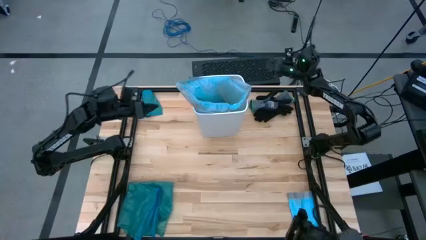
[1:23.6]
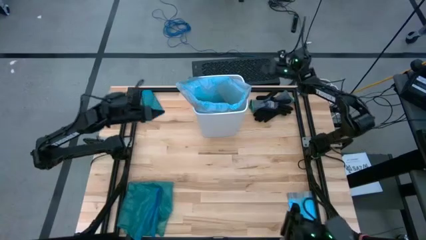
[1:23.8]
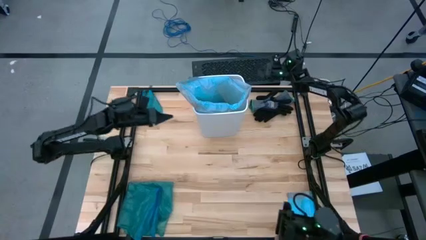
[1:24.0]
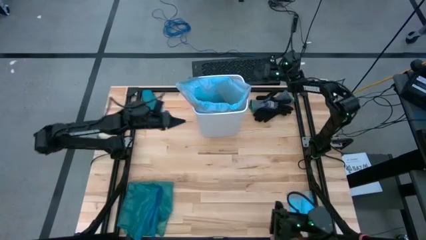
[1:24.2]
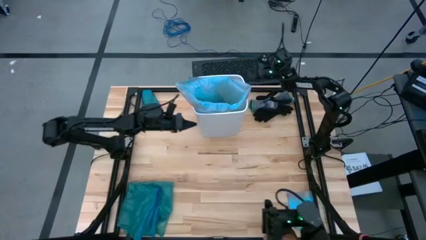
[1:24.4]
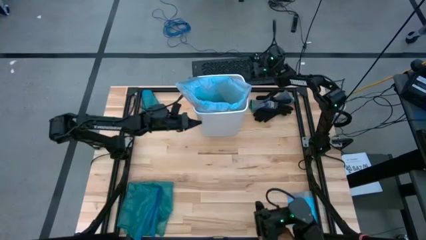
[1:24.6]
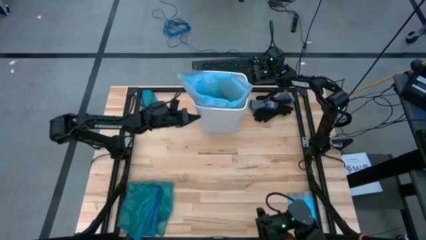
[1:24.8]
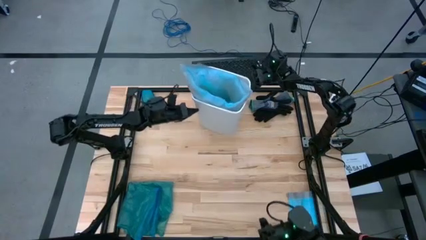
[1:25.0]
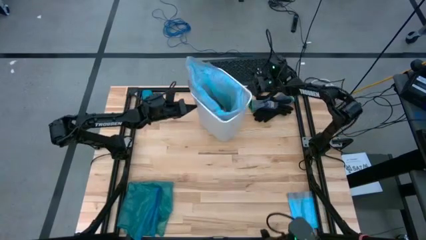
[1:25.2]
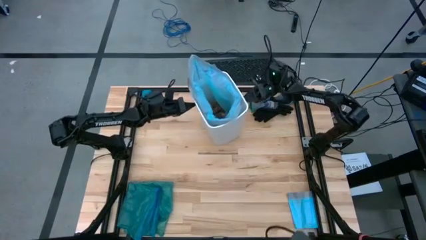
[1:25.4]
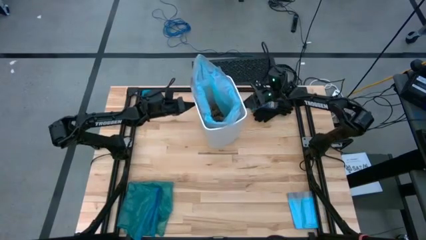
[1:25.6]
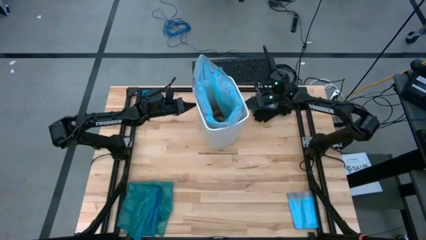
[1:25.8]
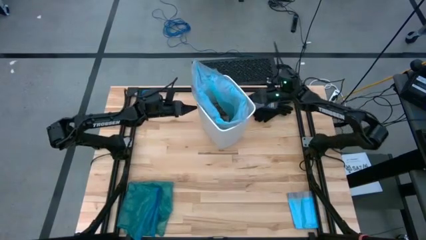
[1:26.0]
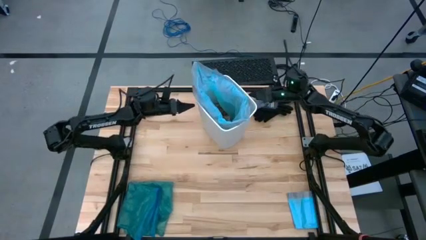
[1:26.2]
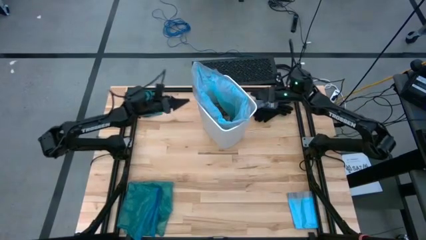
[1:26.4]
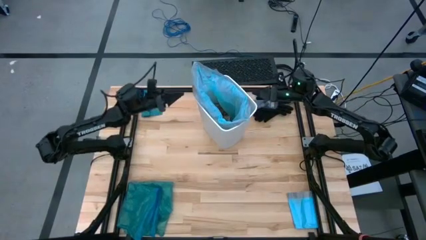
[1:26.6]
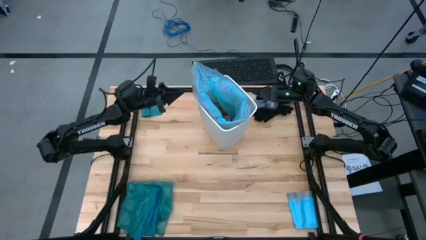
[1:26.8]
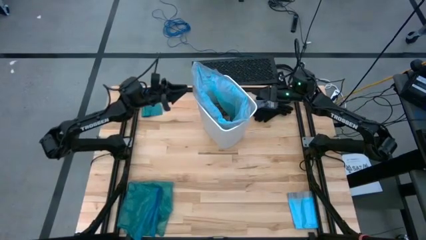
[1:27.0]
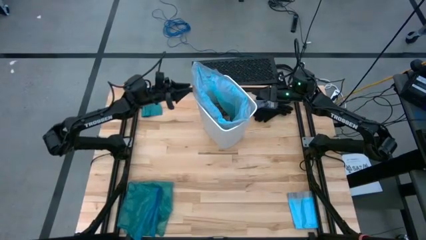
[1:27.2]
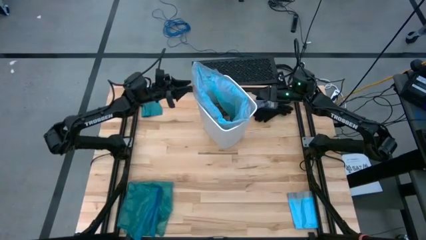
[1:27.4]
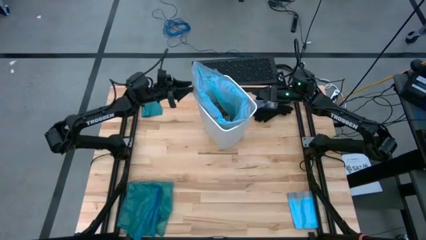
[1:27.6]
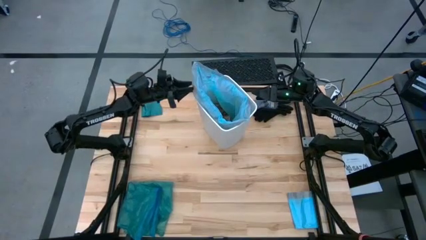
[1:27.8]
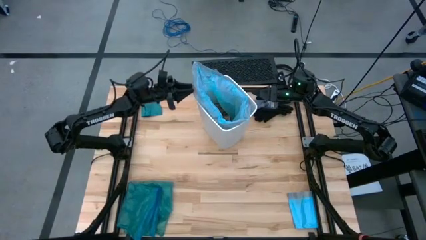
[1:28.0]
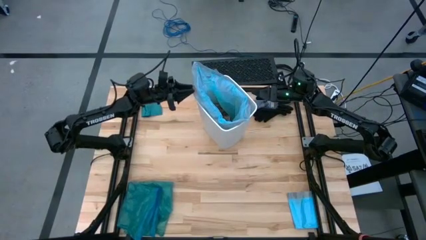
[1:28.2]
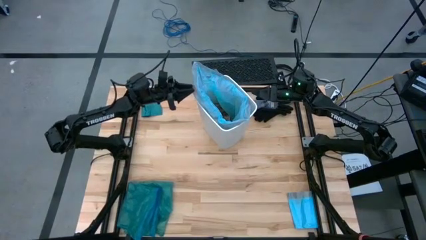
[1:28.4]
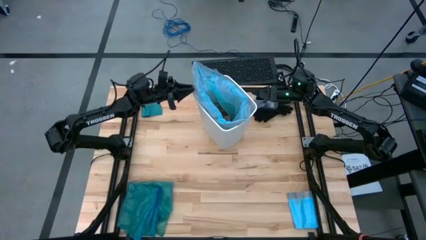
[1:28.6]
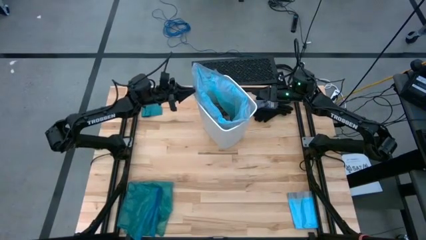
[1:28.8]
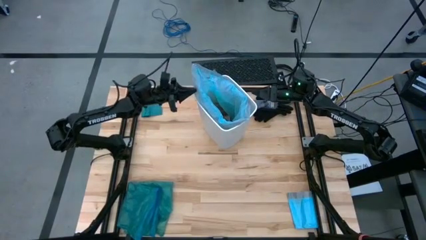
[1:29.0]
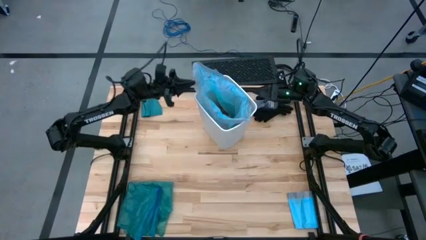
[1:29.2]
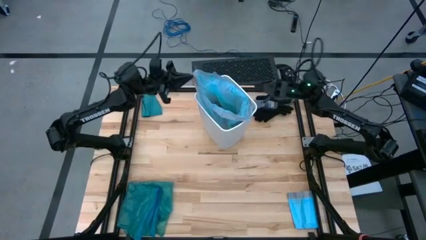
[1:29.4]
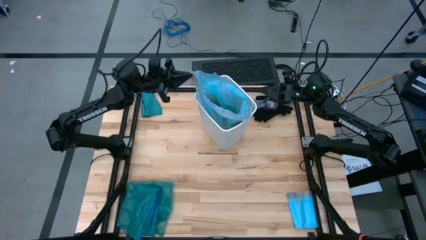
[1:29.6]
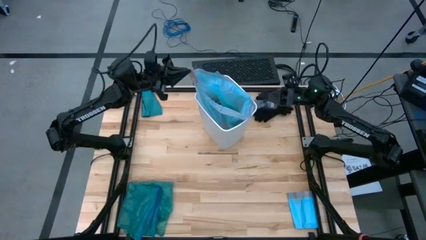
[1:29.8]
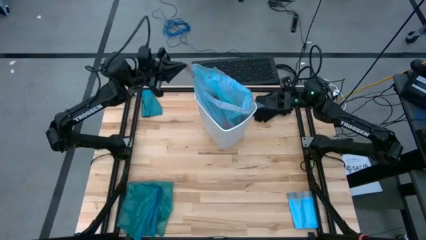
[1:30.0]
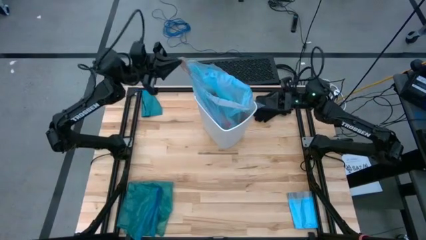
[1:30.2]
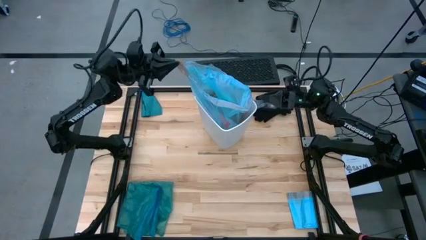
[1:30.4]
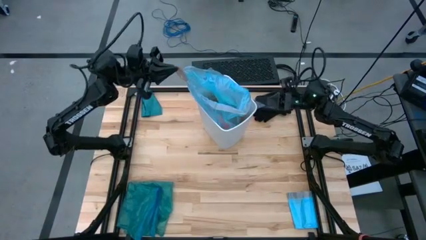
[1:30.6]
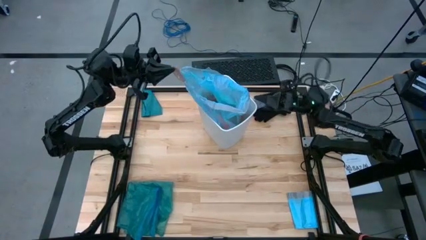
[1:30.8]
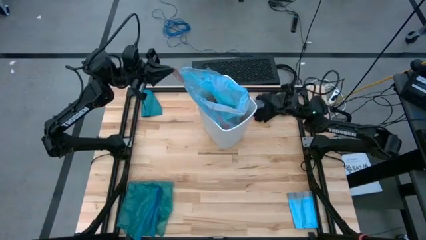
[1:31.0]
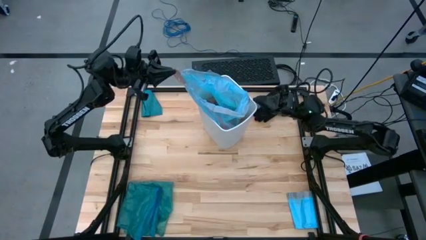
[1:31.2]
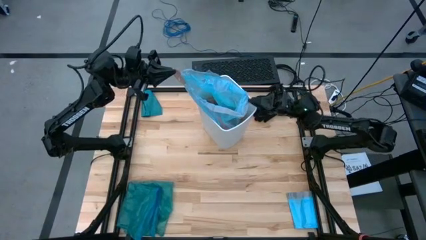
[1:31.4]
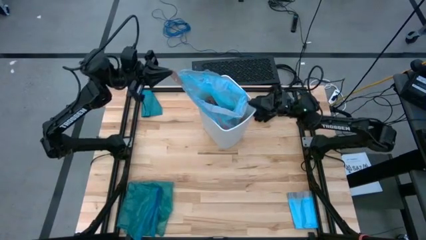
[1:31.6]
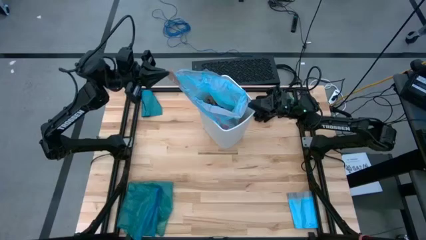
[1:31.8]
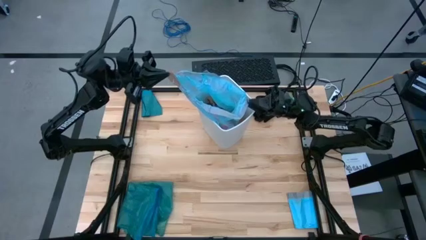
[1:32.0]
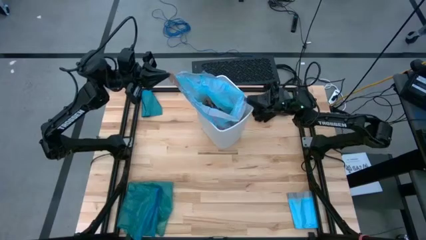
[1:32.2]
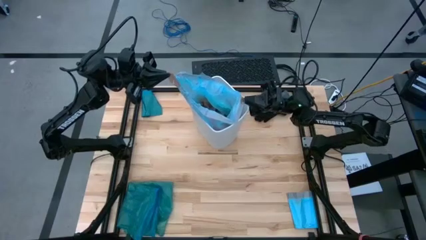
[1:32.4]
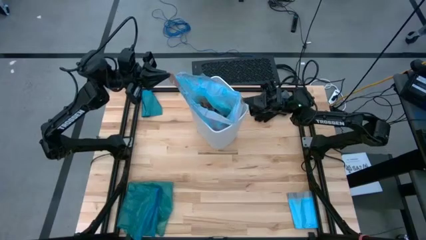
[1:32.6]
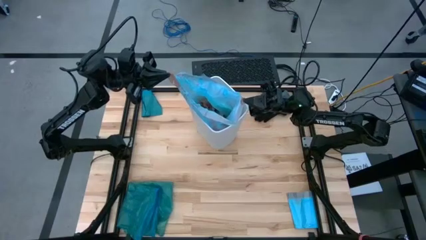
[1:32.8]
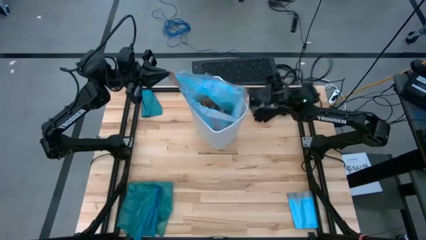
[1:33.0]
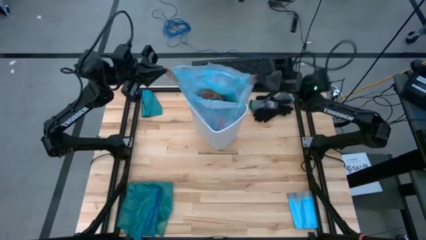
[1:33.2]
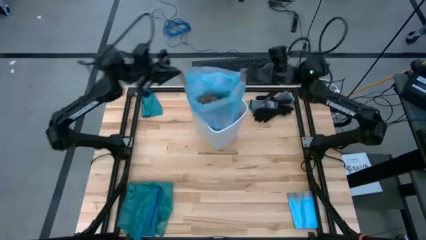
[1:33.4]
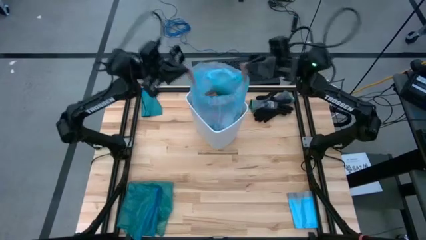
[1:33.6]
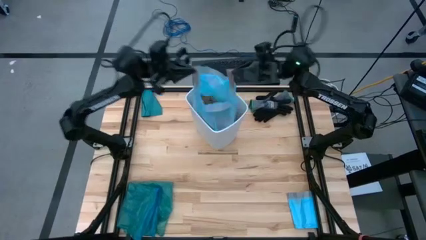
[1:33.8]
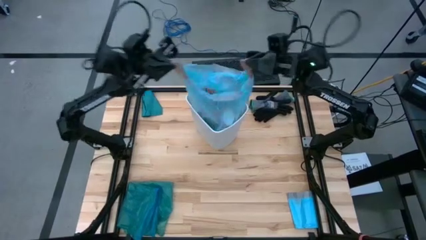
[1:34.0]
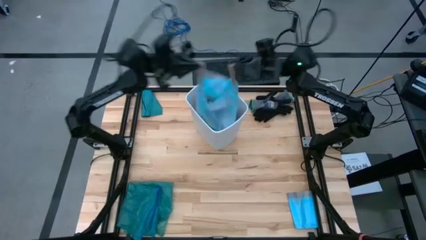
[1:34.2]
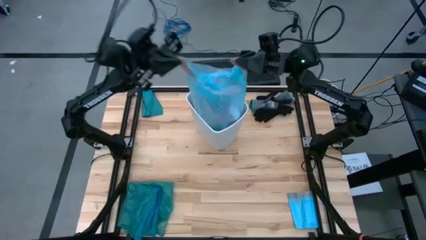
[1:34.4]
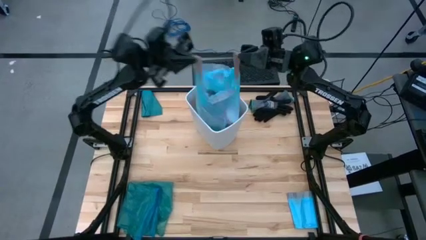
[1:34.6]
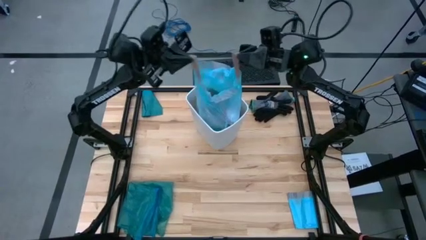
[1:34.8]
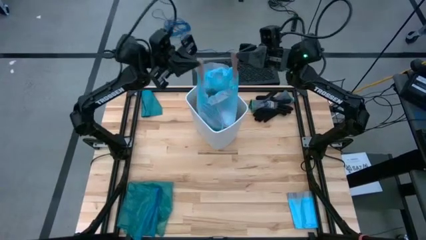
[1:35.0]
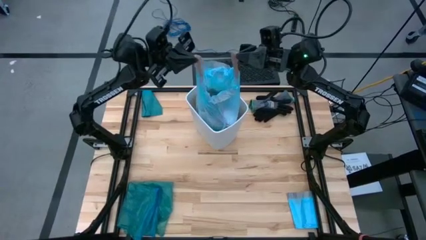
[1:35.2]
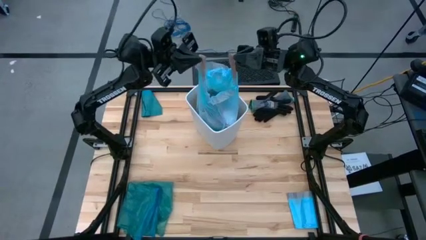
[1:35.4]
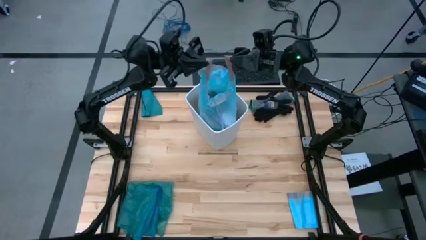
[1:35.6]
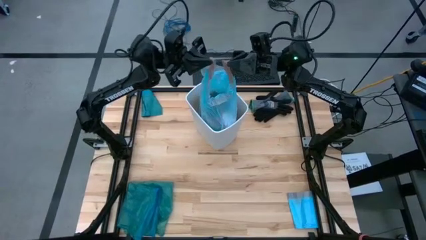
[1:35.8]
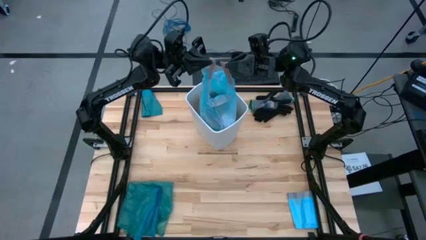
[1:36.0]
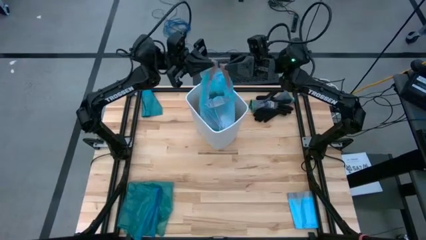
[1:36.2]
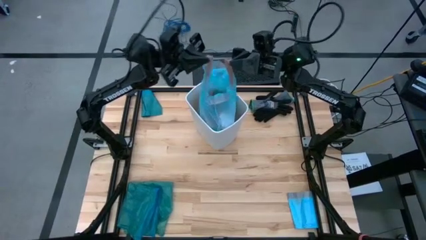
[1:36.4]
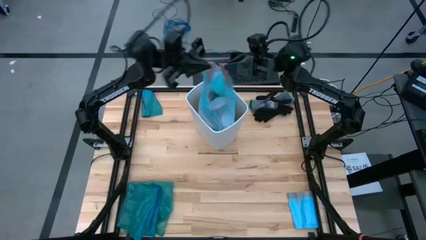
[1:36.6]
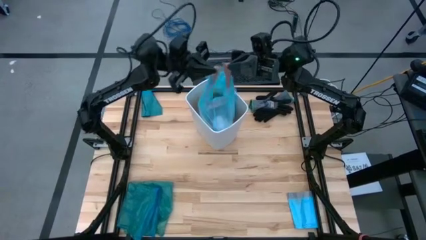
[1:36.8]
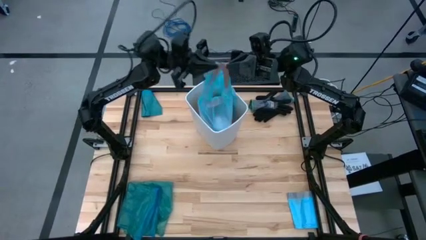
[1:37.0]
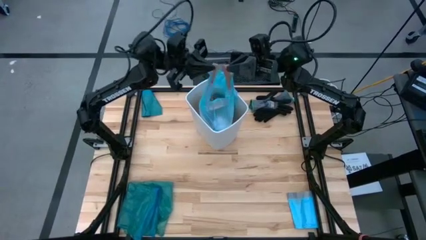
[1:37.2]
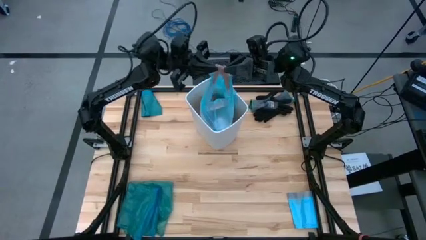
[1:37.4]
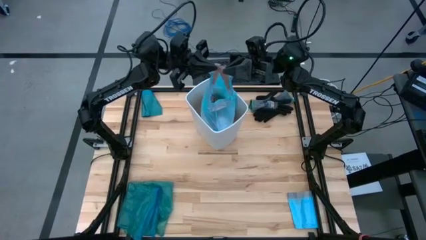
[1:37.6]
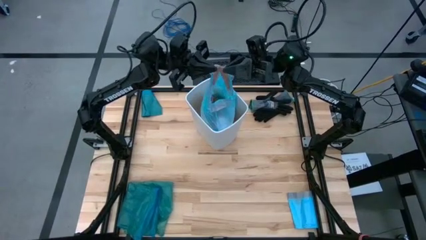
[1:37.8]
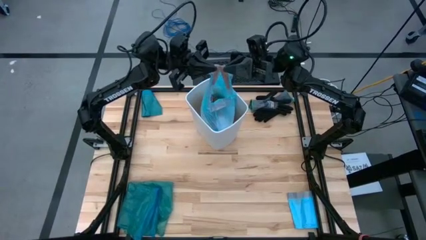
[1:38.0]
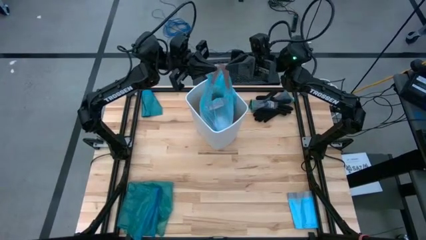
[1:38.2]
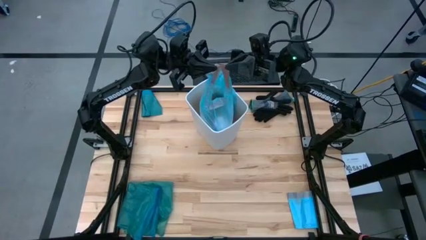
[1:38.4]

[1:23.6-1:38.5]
Task: place trash/remove bag and relplace
Remove the light blue trash bag from the white trash bin
